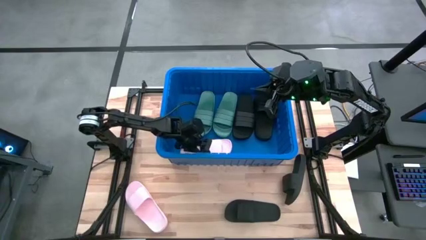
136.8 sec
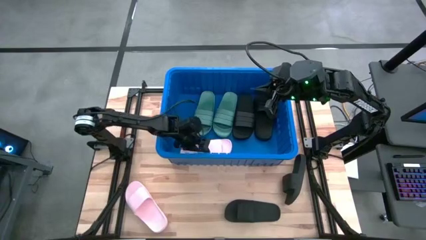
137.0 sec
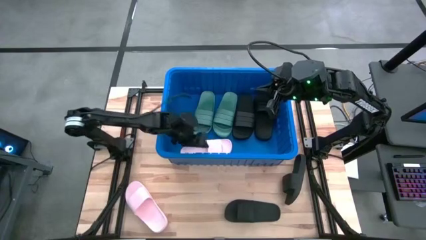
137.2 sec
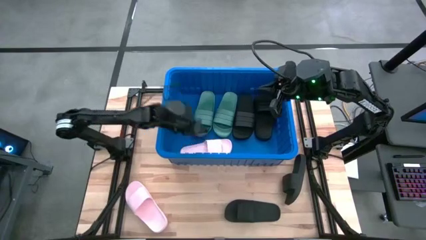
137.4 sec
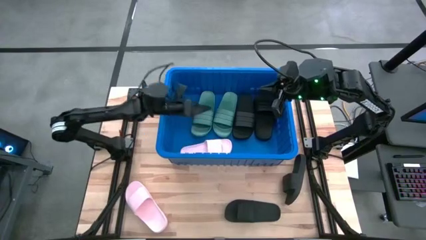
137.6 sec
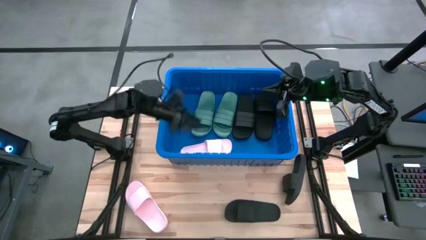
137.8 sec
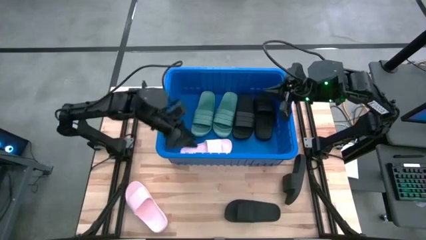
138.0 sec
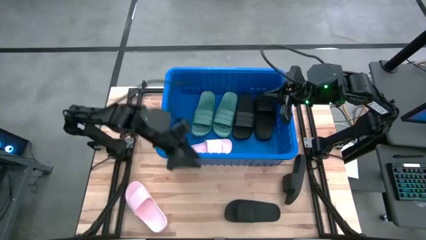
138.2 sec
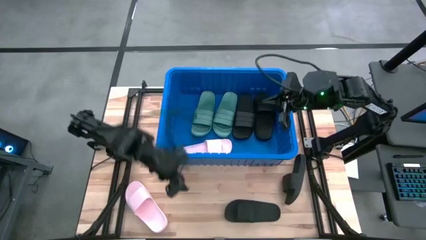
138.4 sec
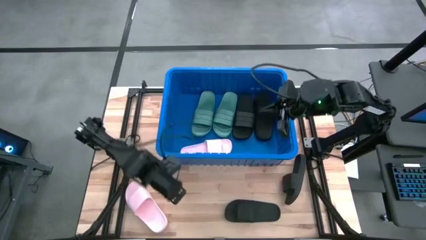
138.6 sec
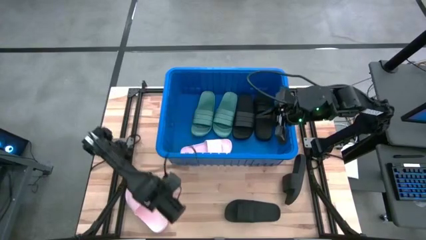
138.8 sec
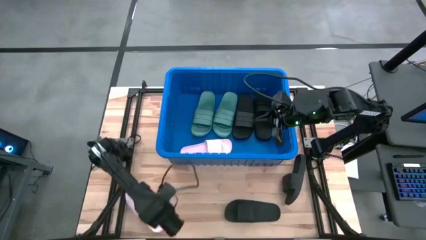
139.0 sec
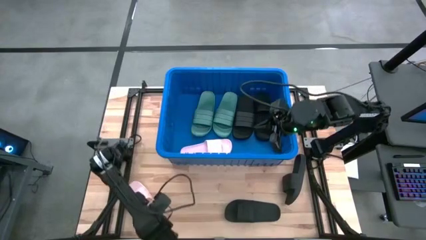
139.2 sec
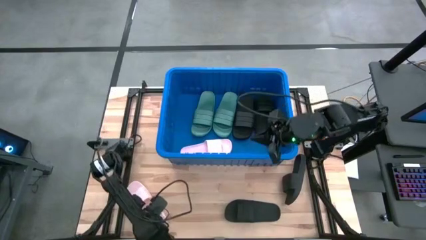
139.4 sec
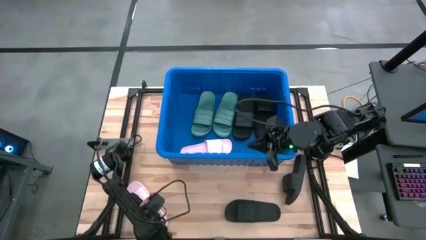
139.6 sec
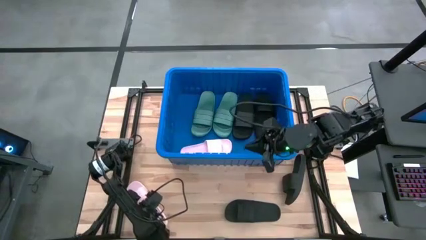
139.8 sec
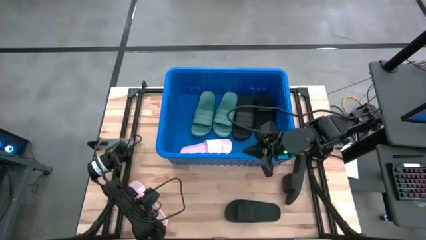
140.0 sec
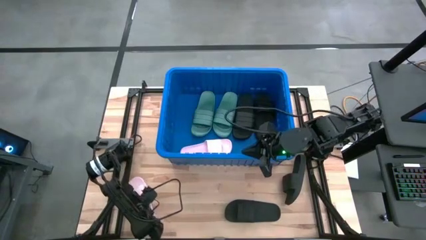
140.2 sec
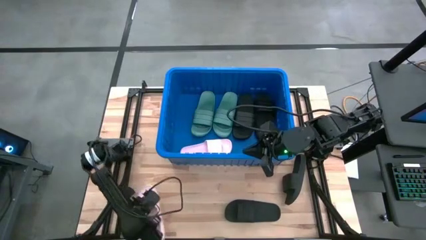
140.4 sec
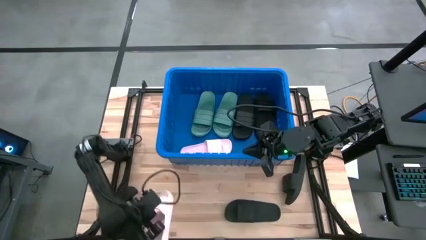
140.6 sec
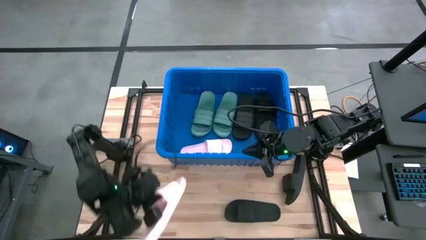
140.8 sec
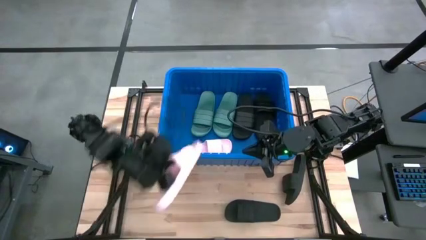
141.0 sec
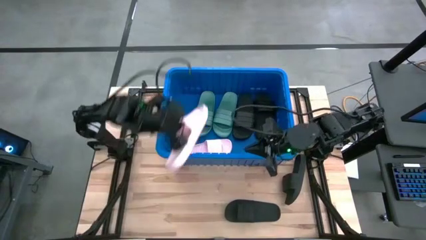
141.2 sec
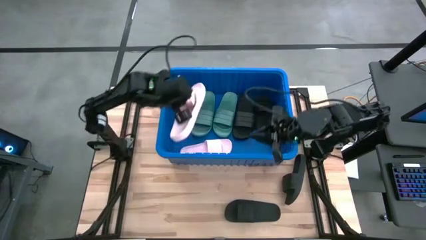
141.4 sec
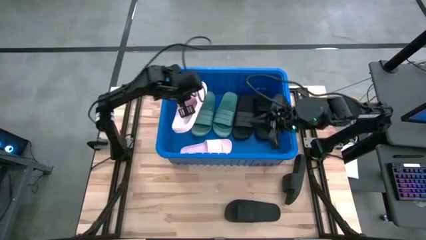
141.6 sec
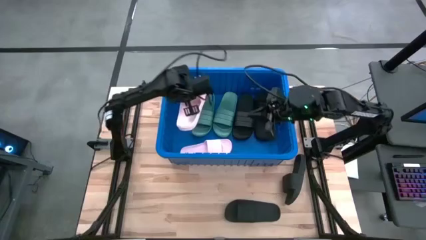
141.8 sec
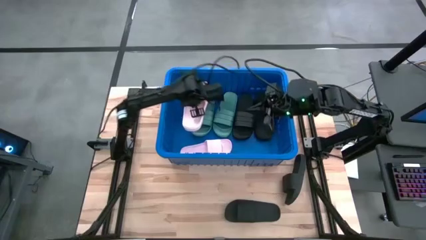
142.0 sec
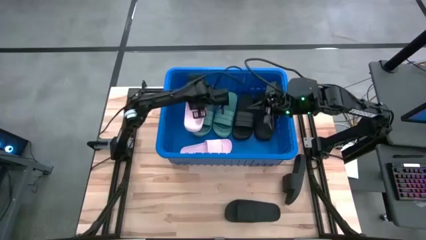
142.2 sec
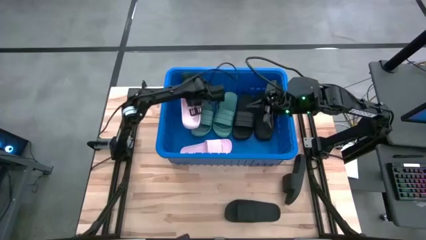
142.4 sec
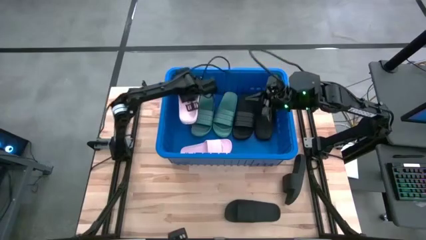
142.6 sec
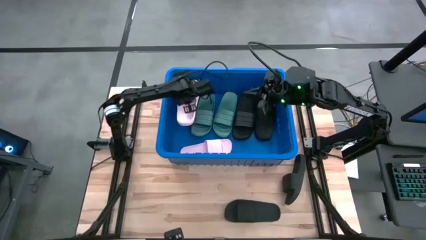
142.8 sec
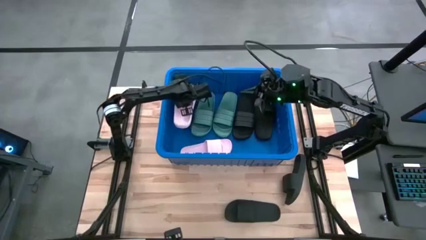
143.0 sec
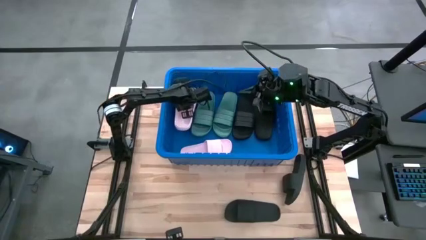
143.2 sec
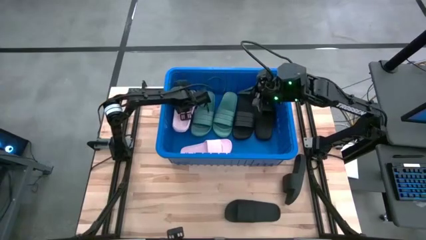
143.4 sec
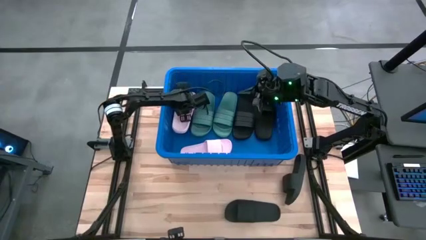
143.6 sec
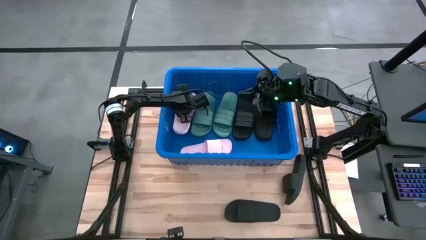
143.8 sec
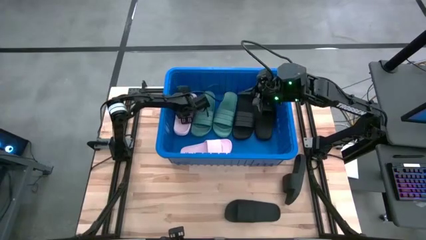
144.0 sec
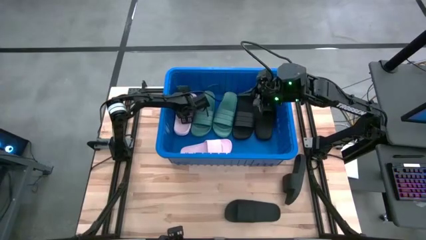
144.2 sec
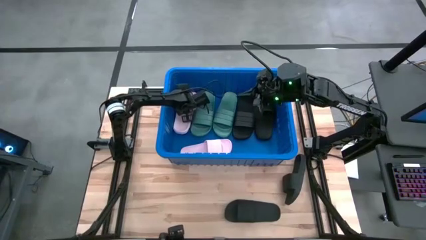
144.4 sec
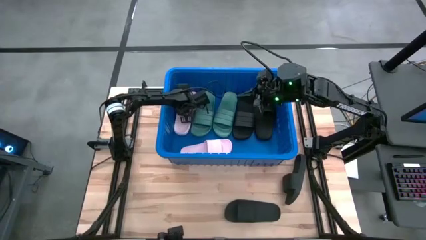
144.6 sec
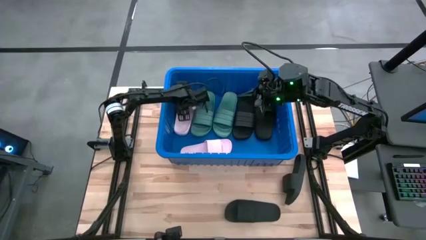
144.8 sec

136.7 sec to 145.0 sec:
Task: Pick and place slides into bin
Put the pink slipper into the blue bin

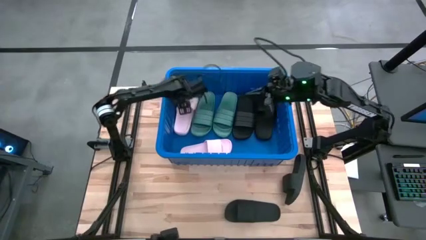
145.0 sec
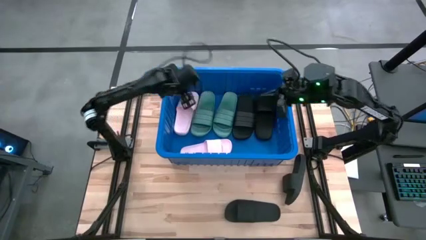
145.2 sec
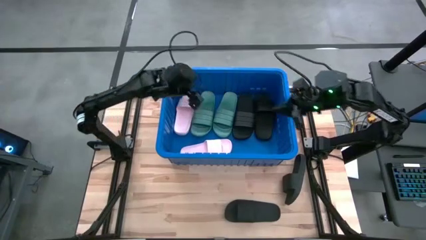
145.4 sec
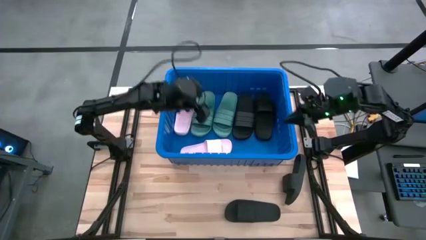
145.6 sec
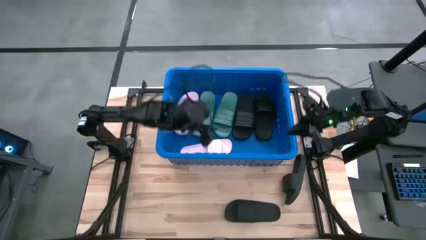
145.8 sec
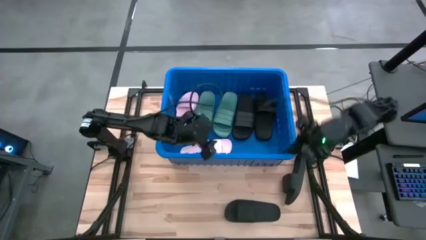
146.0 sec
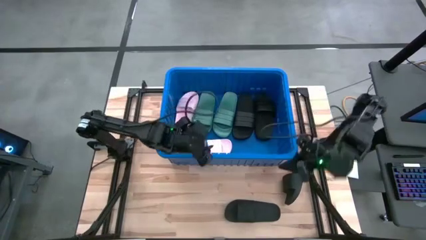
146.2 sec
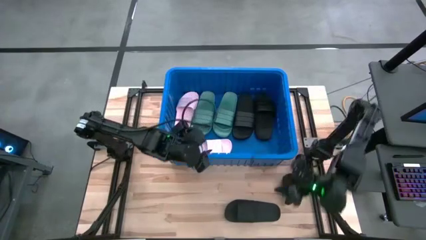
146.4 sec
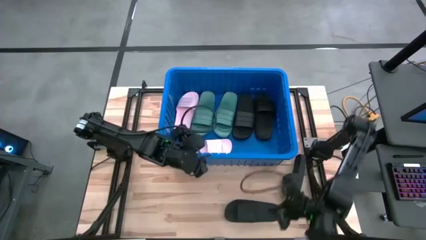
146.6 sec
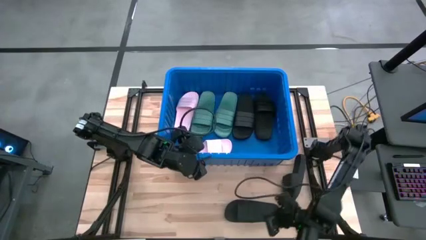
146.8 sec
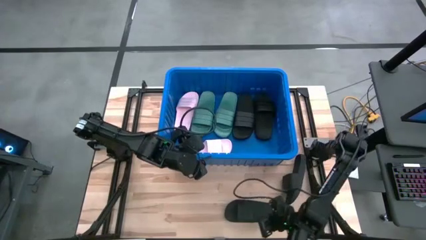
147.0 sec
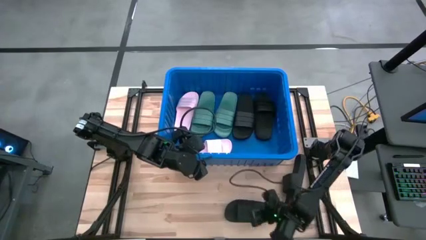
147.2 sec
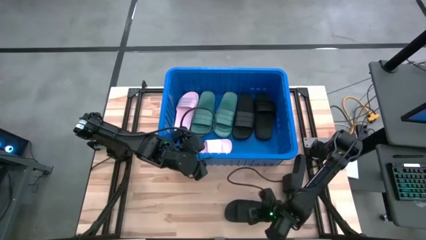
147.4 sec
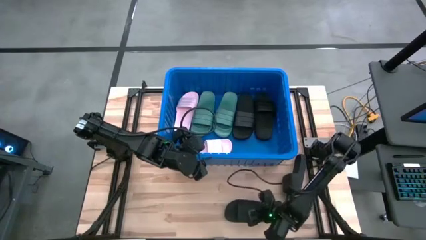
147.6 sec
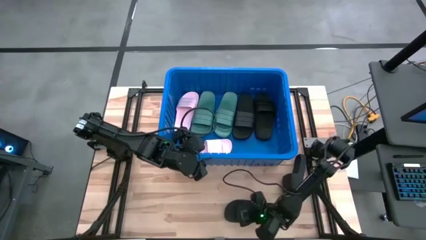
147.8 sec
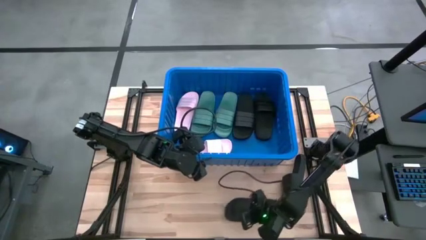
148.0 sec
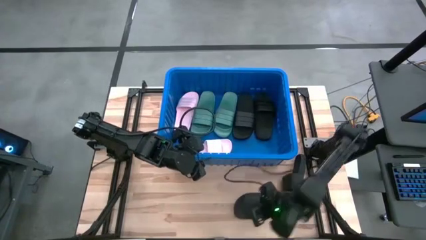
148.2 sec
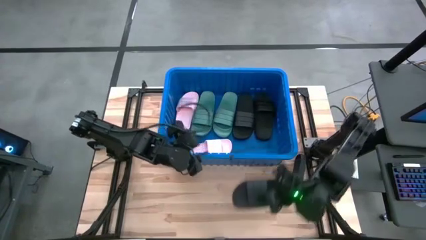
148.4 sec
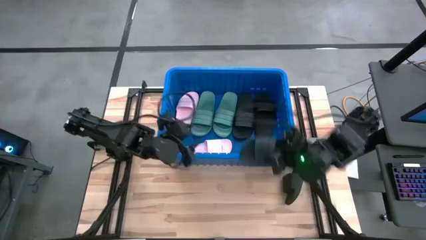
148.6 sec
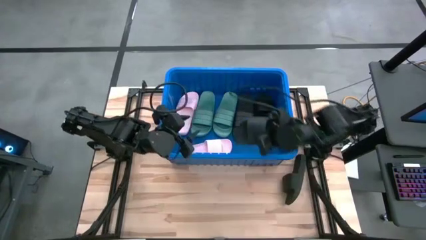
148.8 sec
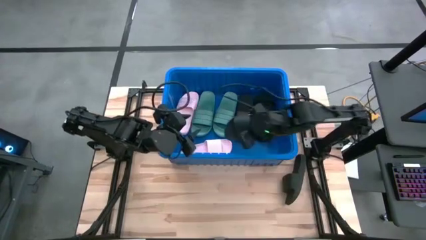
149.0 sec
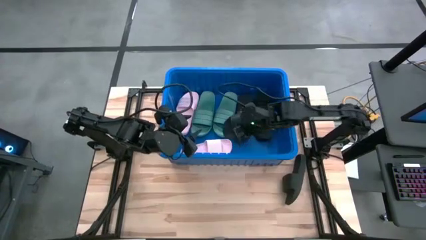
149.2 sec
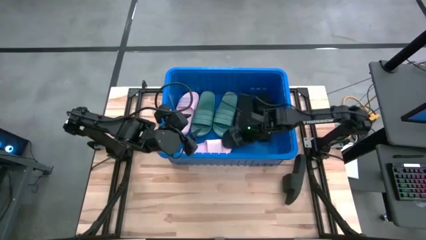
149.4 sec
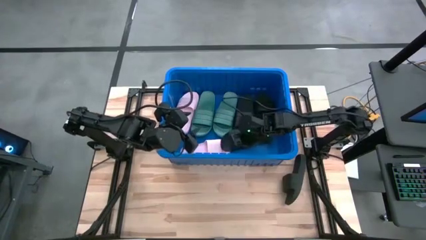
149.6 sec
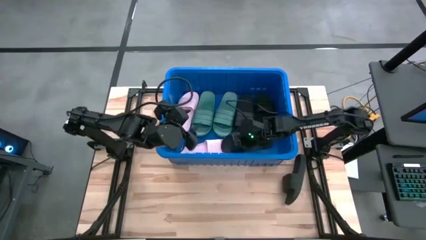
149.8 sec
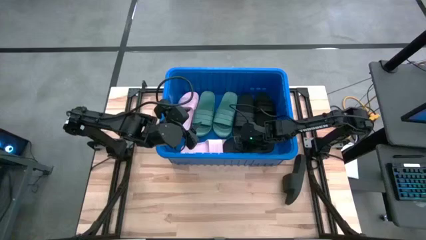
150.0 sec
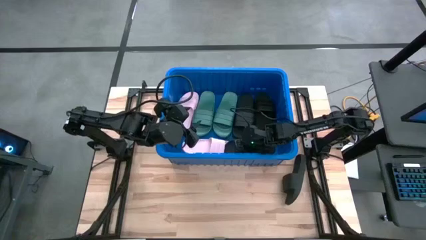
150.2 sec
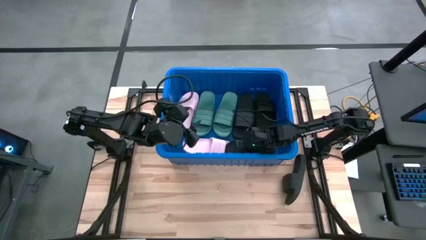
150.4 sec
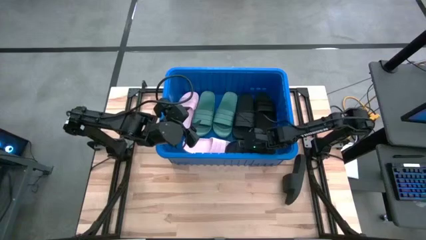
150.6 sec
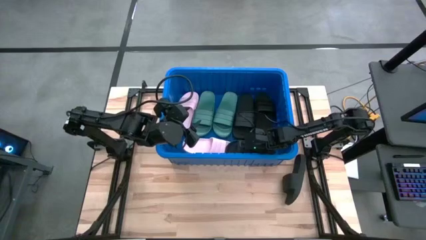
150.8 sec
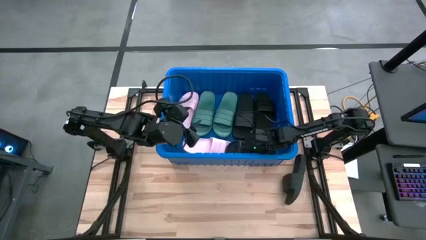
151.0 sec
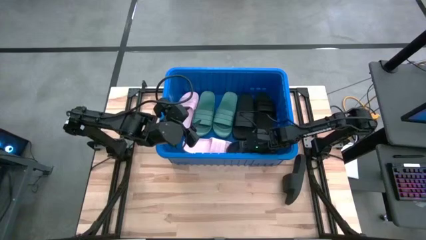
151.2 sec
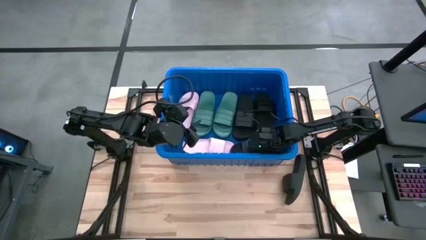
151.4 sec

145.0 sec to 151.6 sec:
Put the black slipper into the blue bin
